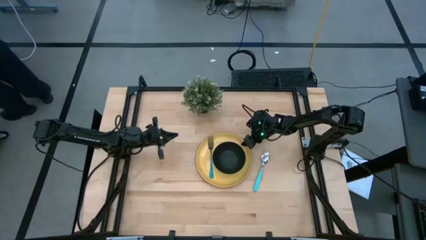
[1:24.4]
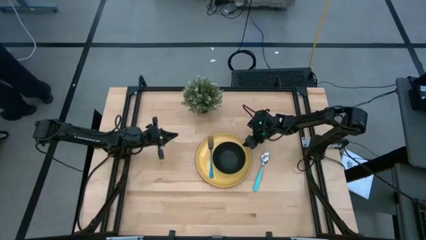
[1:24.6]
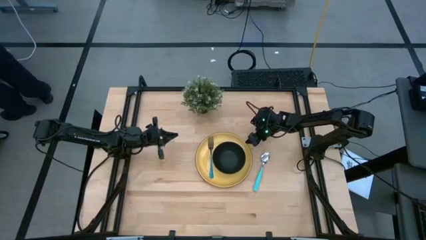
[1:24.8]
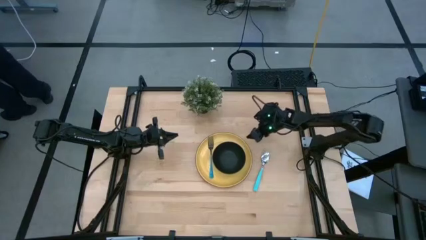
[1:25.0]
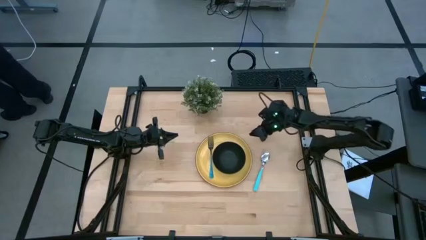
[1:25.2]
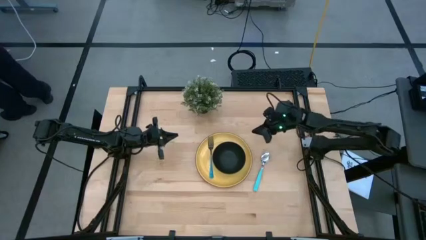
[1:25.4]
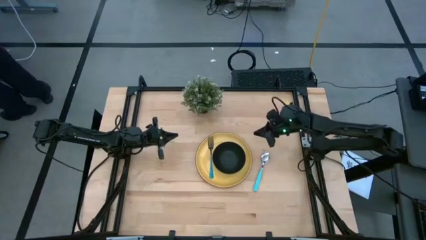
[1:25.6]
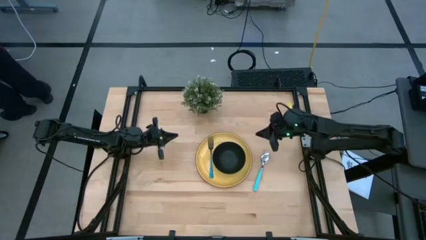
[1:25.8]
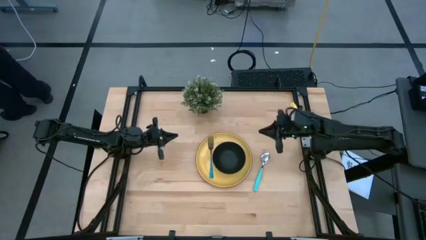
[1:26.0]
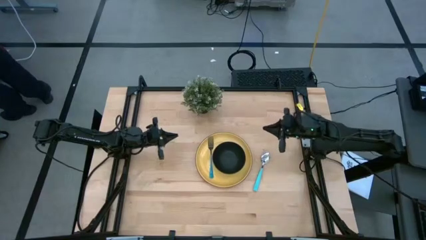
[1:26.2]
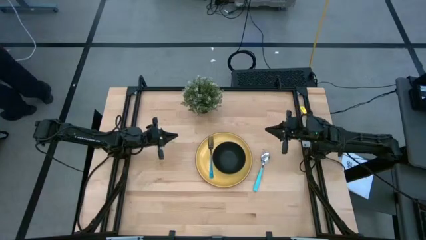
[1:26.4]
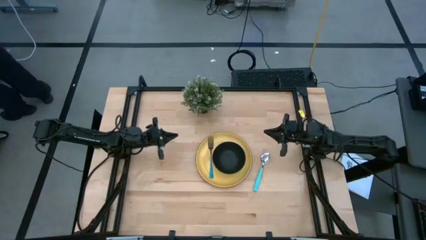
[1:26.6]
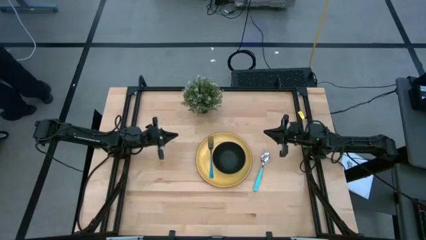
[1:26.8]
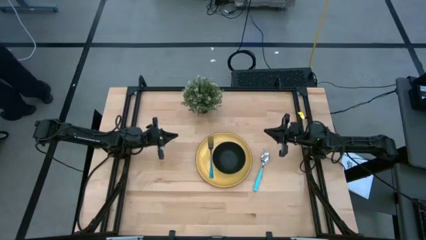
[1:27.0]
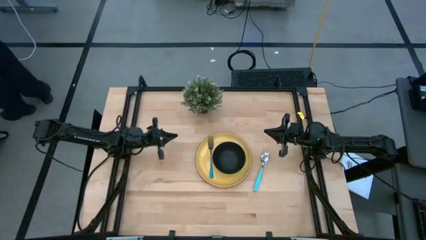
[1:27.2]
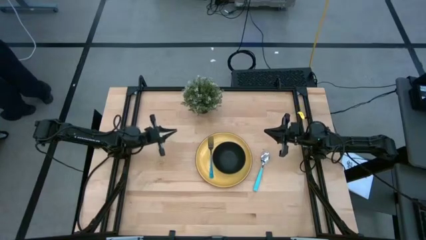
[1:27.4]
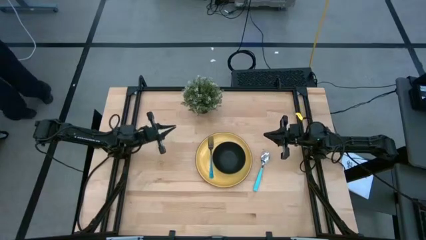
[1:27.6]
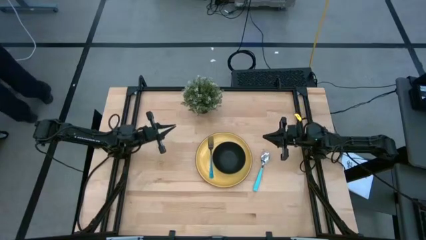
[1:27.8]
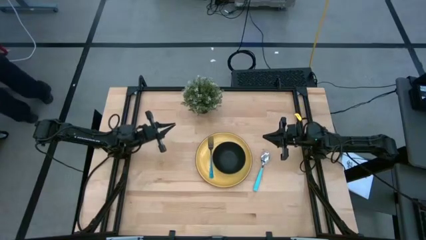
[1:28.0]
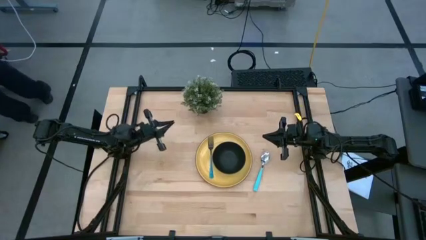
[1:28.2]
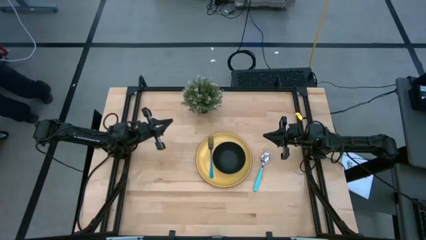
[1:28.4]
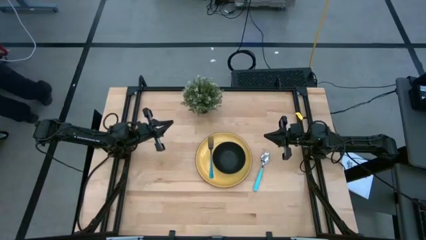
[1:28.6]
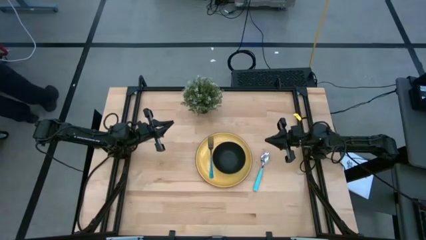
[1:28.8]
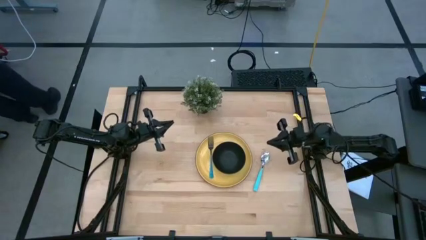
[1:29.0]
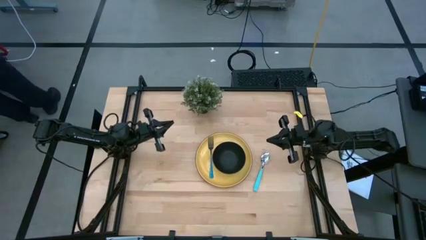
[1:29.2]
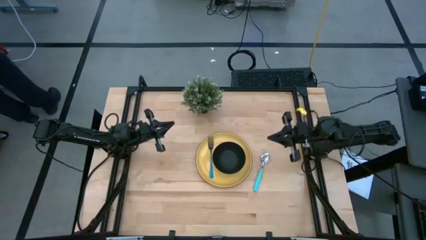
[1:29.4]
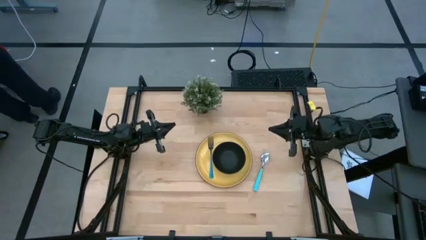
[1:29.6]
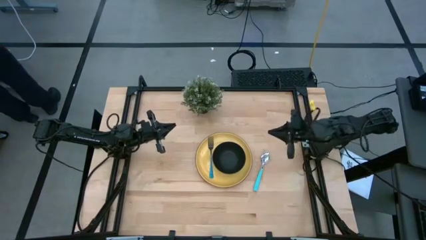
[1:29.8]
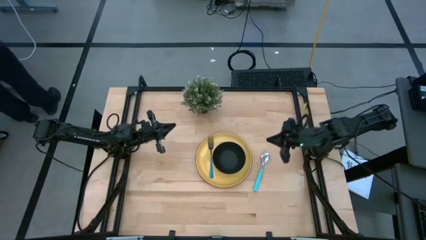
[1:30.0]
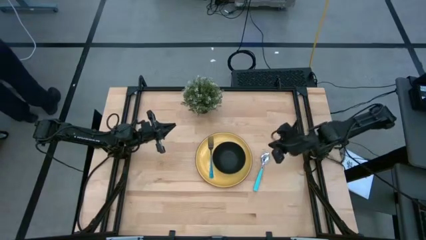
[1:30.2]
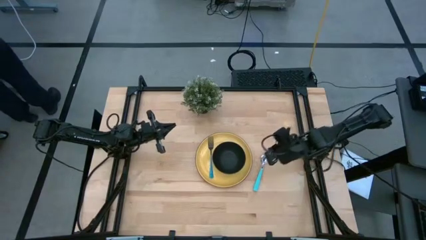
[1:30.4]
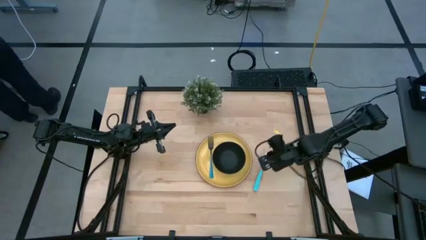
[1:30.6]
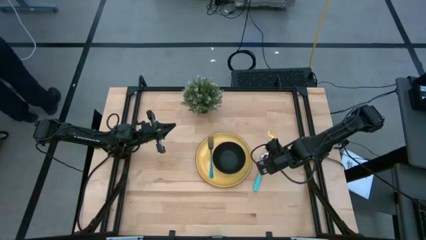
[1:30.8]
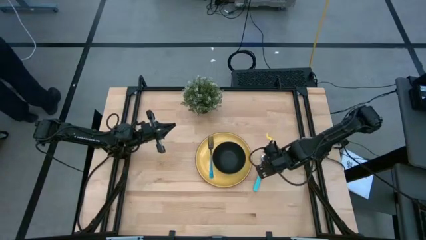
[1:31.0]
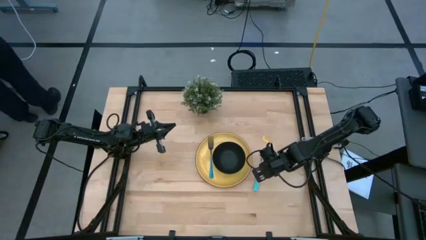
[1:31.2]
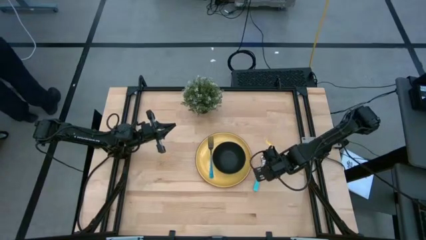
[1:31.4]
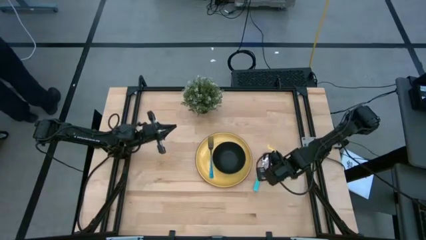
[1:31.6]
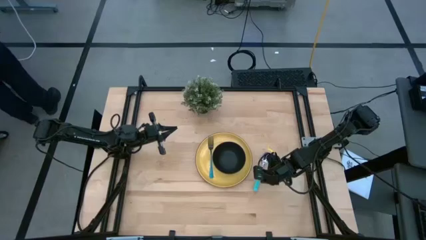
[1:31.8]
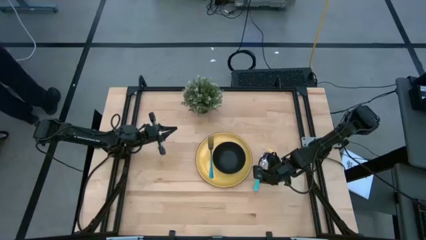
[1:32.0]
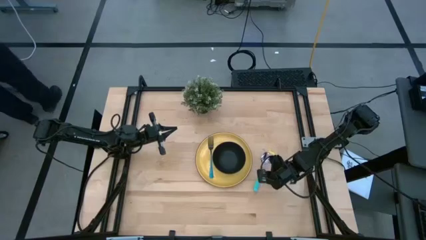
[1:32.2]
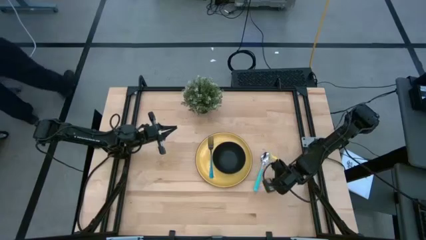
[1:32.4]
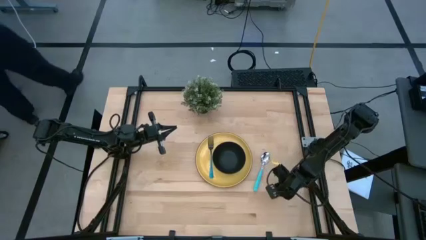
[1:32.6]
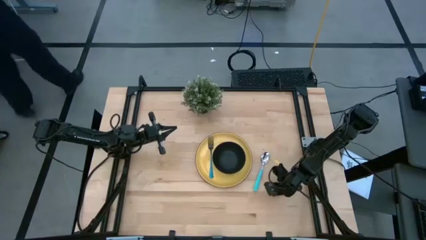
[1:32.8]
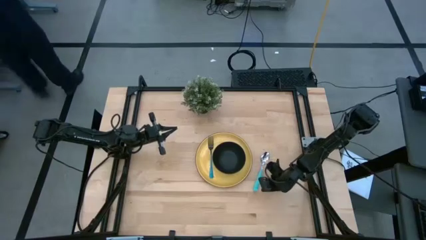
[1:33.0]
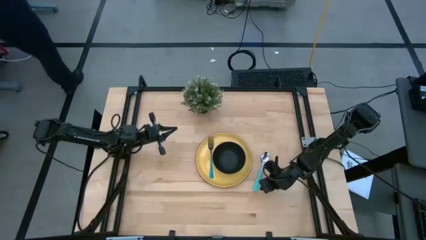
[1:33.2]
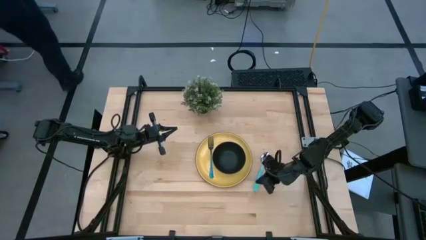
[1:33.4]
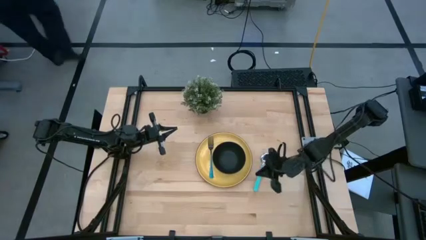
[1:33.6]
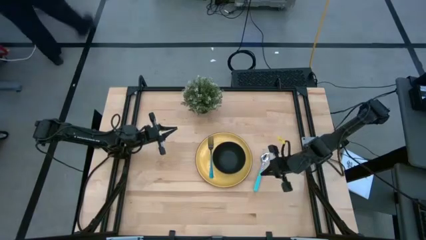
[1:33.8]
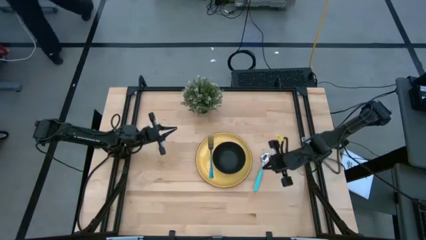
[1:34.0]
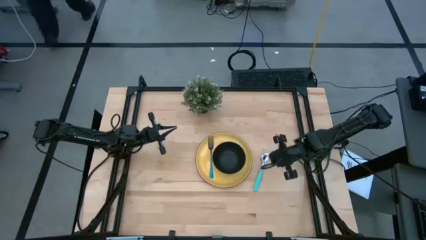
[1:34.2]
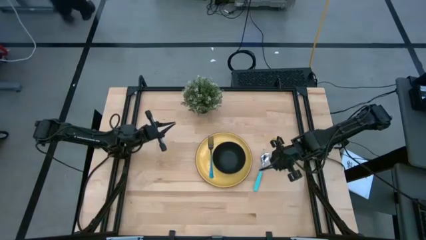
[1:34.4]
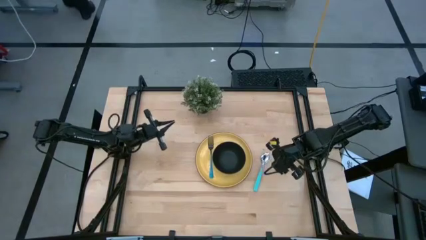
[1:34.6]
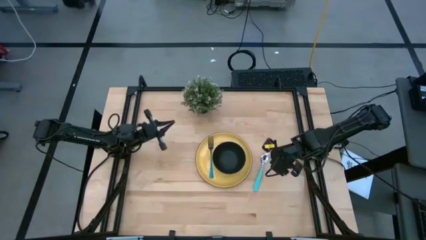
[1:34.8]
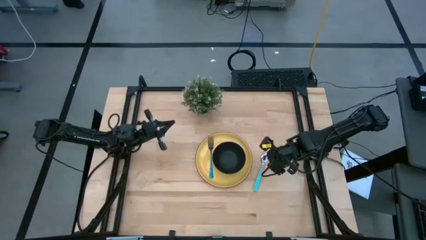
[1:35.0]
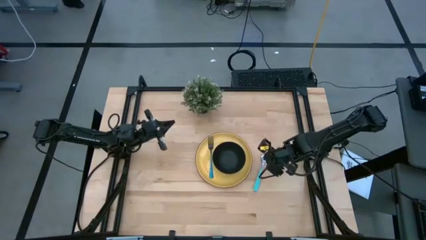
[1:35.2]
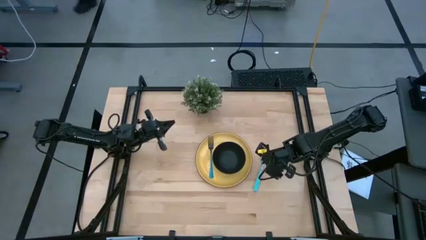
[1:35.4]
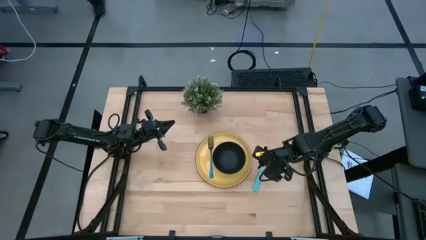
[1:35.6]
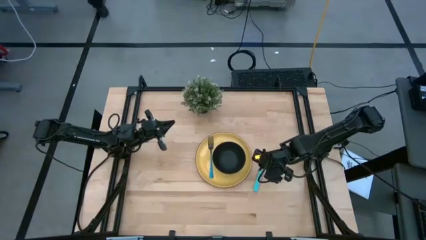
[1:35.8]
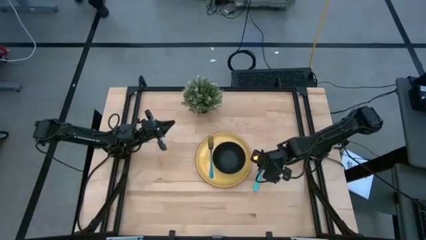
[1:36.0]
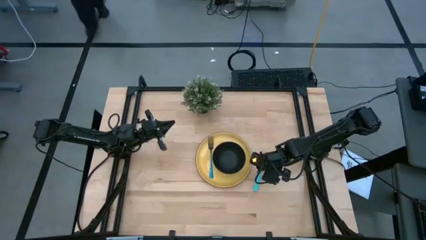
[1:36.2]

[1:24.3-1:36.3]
Task: Set table place
Put the blue spoon into the black bowl on the yellow plate

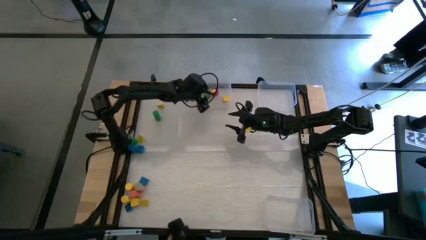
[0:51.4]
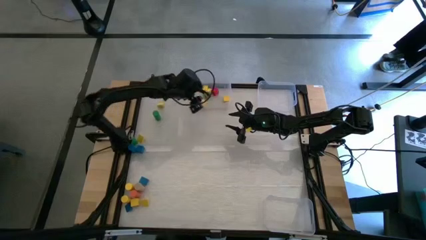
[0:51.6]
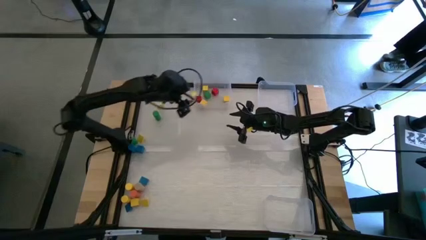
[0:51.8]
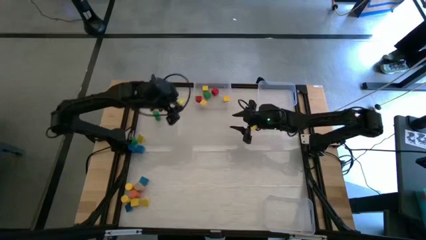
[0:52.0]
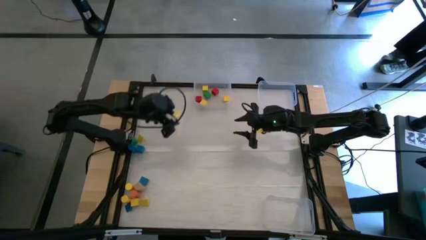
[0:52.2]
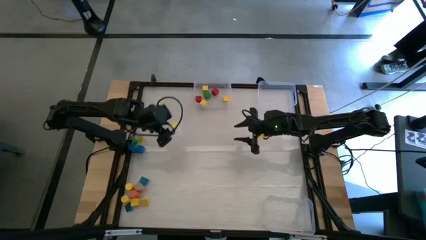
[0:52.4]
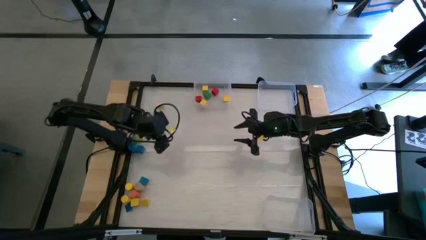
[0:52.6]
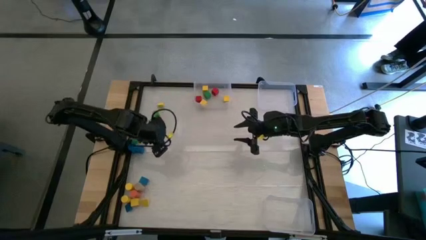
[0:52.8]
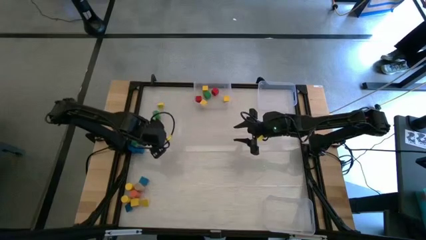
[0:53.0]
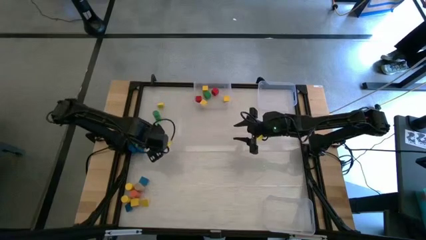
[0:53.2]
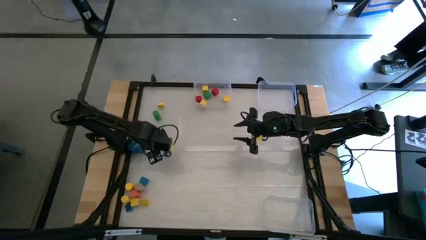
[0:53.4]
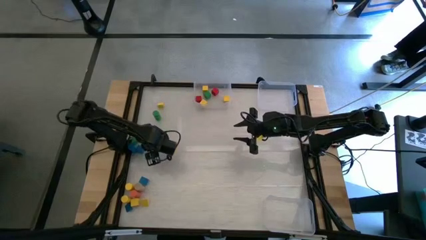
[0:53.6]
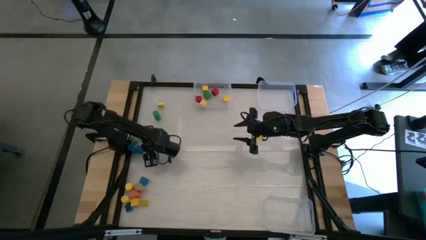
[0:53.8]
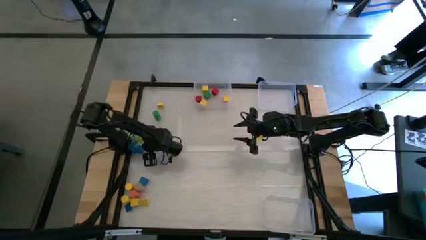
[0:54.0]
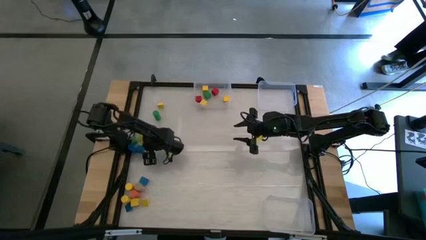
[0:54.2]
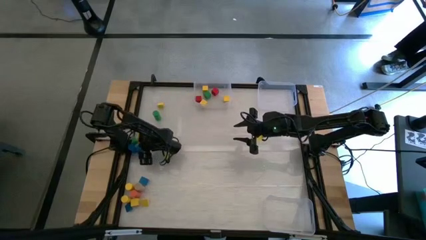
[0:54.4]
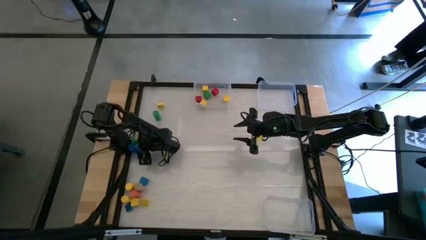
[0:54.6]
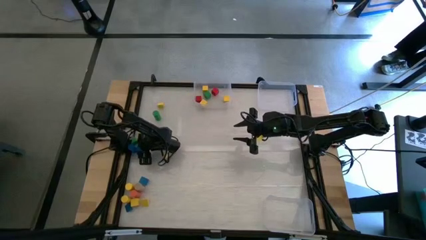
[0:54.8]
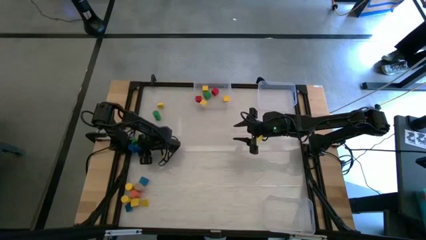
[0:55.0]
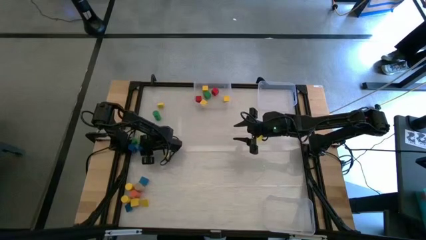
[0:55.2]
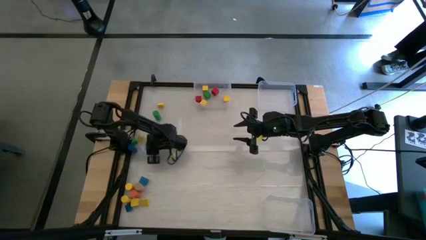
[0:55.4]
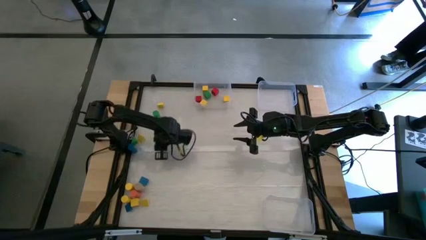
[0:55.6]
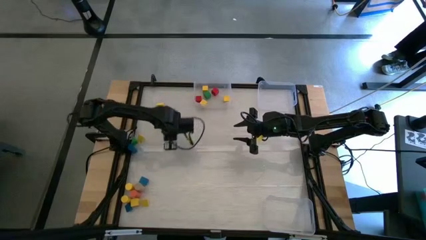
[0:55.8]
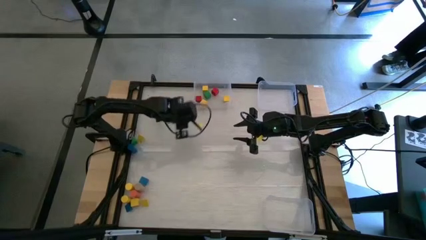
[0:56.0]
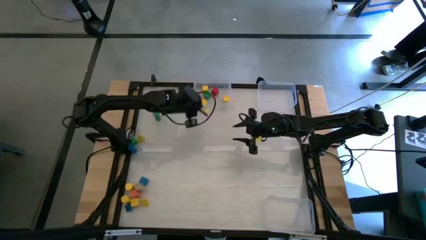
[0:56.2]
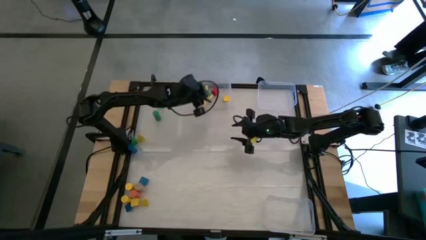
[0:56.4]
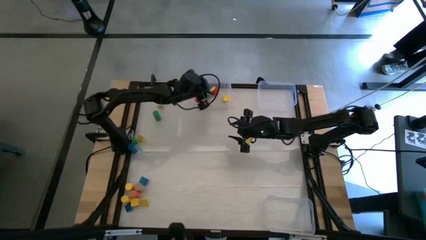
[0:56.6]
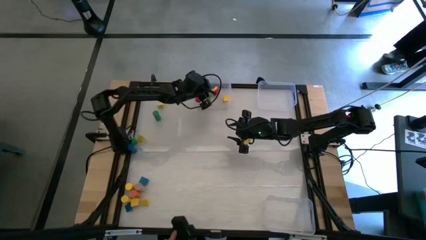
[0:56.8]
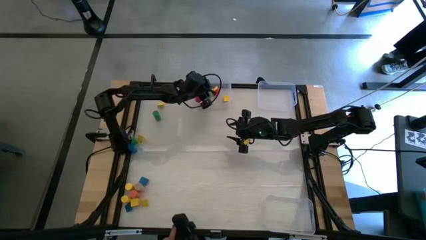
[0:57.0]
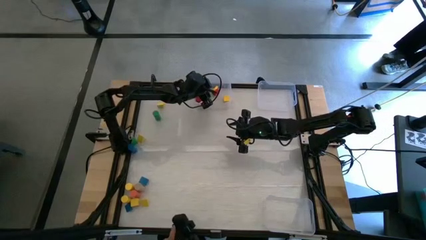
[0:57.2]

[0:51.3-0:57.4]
Task: Sort blocks by size
Put the square blue block into the top left transparent bin
